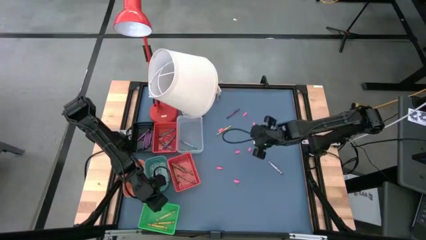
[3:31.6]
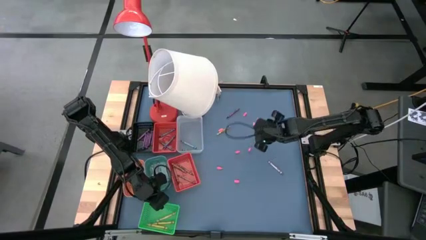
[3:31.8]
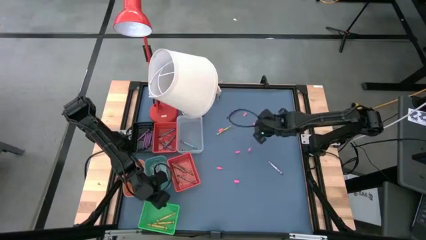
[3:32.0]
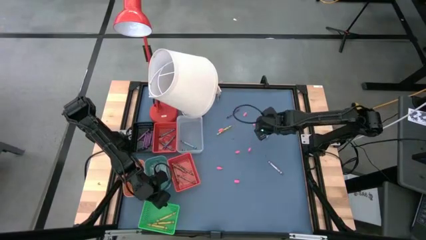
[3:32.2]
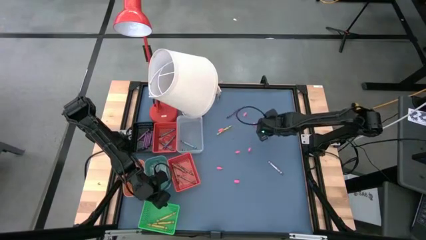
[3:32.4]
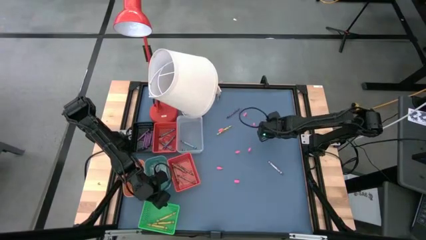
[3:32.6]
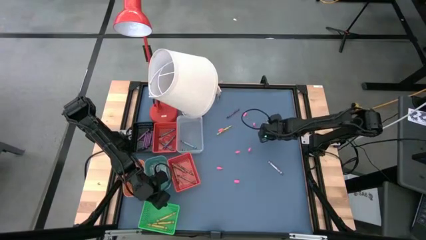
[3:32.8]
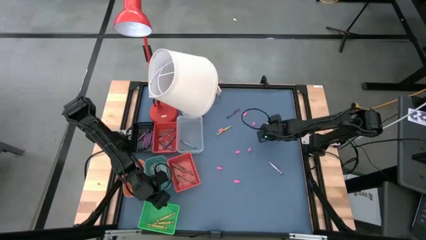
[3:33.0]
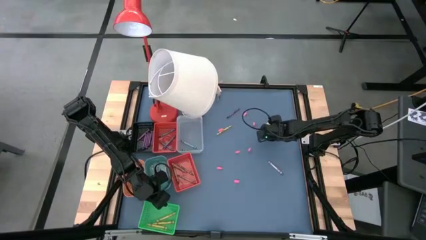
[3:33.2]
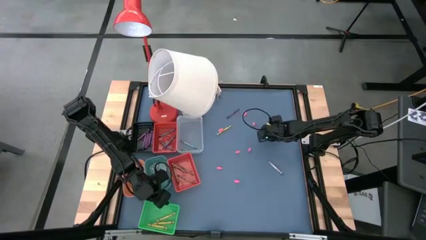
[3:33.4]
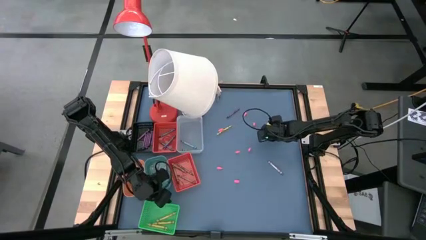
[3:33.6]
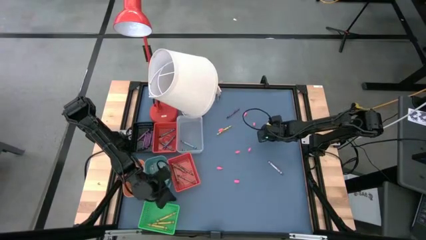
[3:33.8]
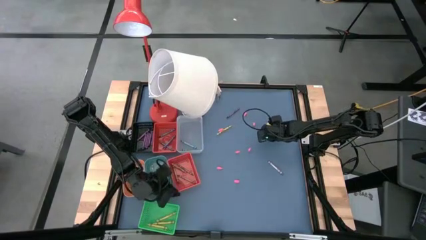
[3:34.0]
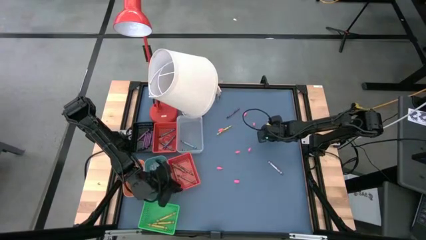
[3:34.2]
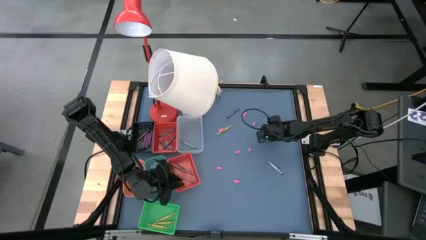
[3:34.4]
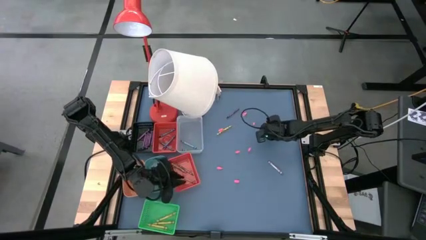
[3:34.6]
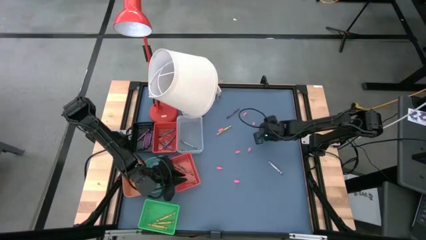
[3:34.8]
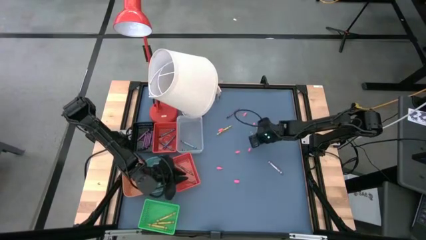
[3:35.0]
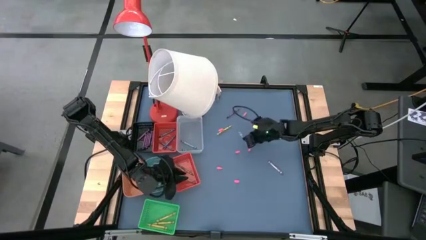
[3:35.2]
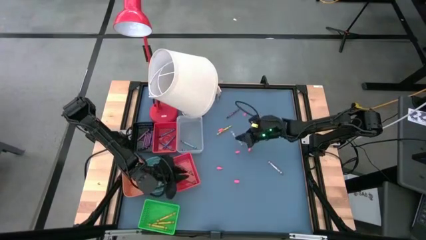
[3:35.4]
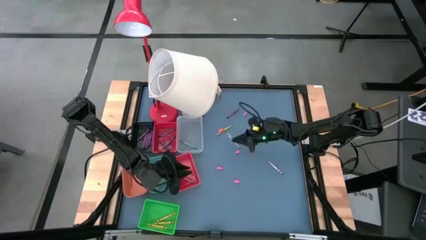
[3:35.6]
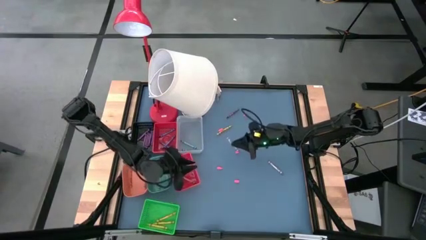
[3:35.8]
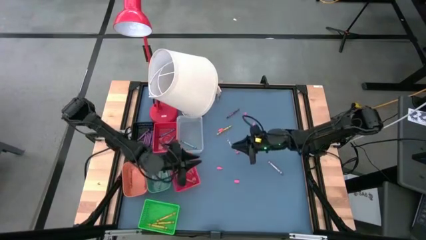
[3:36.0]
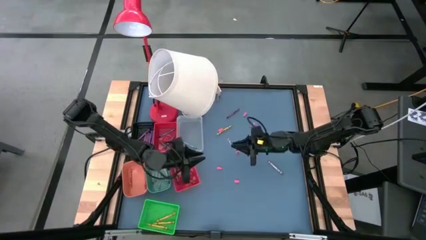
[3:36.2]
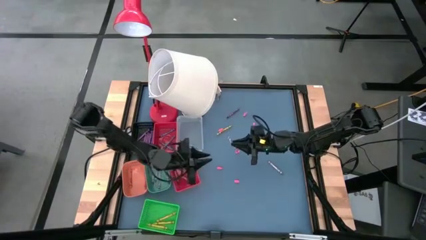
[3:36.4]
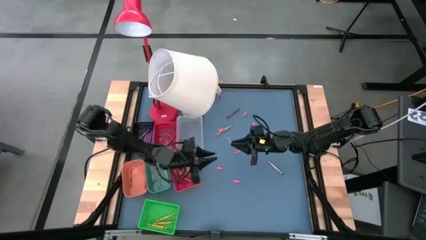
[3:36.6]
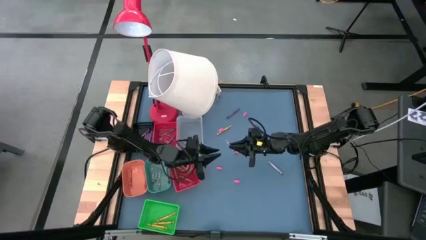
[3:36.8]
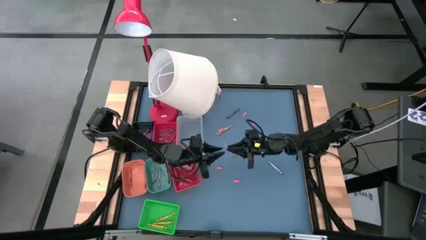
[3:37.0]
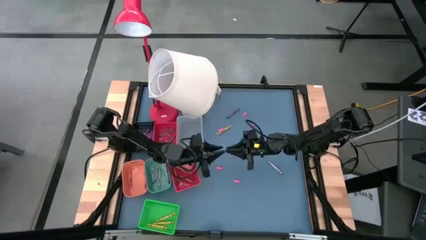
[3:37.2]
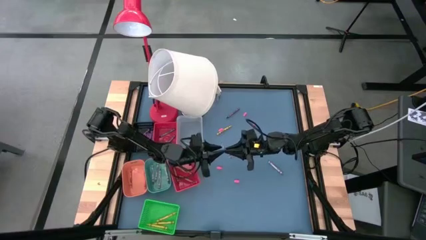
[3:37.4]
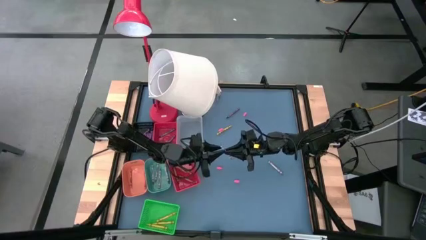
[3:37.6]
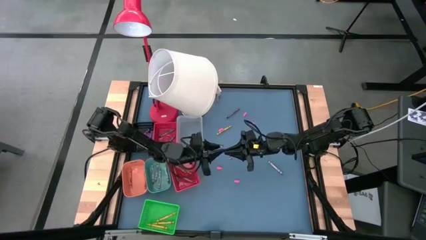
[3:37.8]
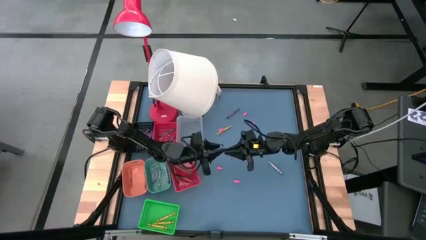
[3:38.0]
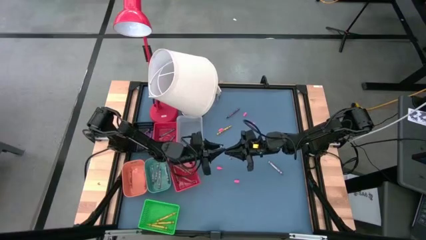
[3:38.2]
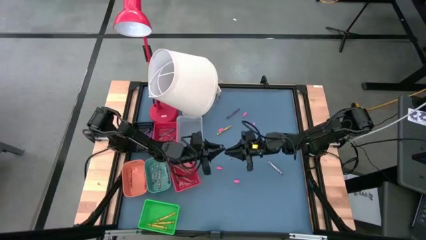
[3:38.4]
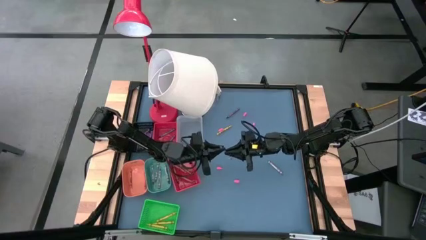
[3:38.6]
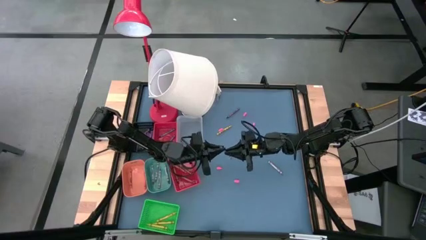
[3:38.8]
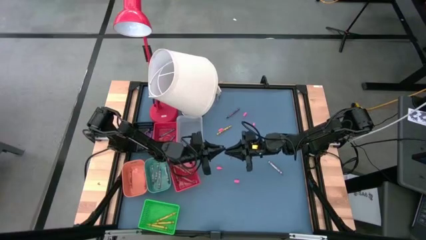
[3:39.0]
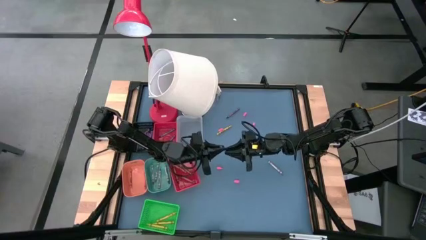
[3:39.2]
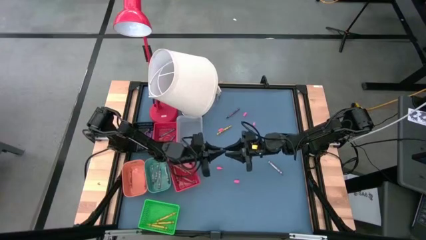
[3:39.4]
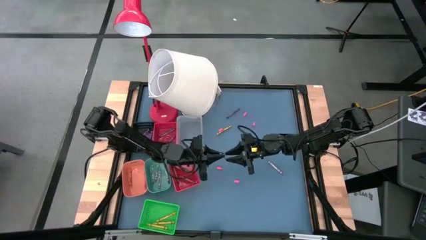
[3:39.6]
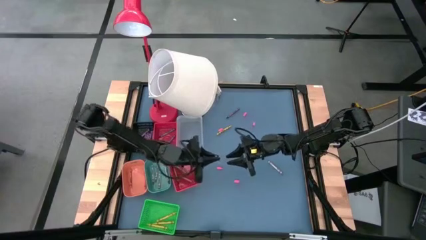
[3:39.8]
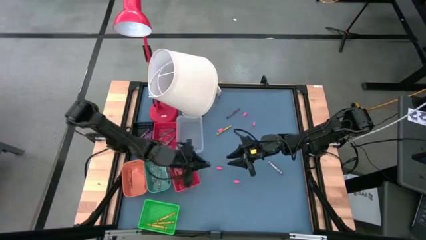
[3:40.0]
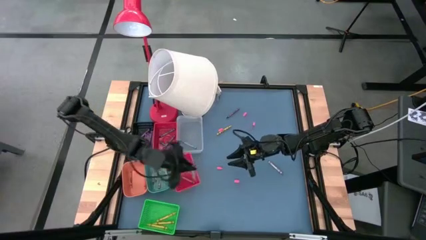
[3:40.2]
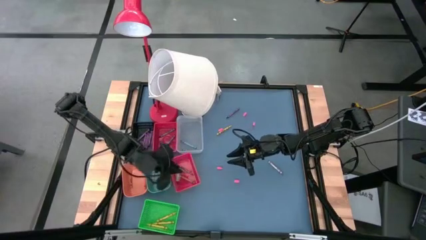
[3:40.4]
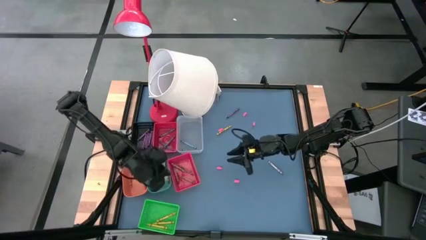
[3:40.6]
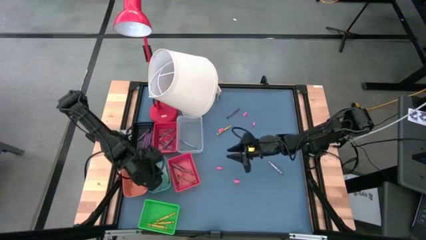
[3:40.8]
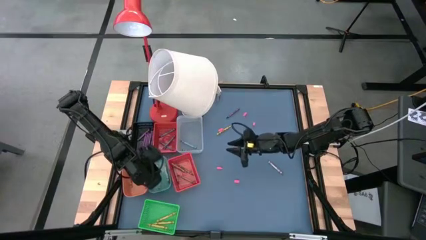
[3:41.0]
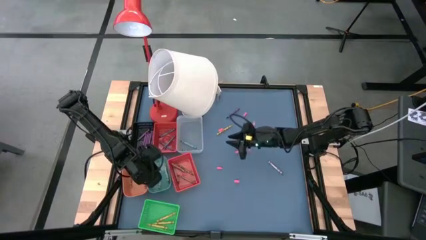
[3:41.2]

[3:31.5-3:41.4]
Task: Sort crayons
Put the gray crayon into the green bin

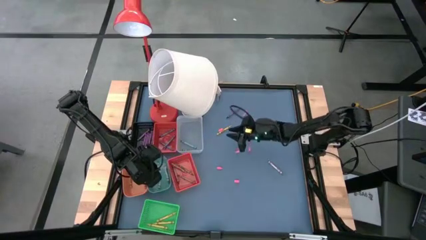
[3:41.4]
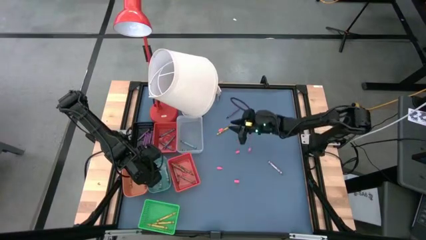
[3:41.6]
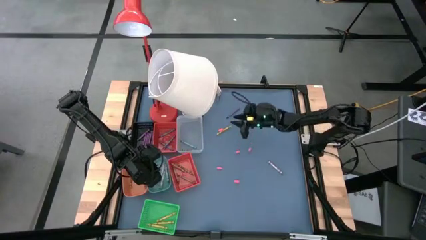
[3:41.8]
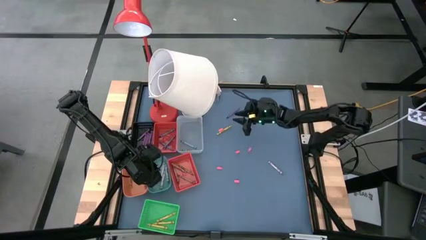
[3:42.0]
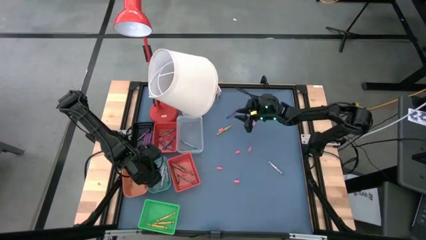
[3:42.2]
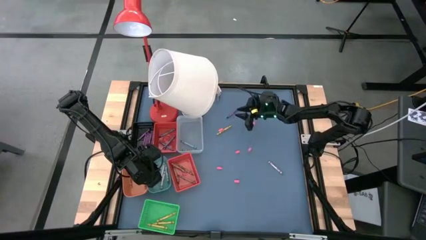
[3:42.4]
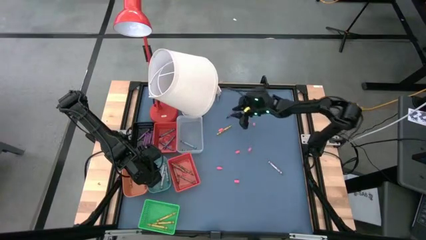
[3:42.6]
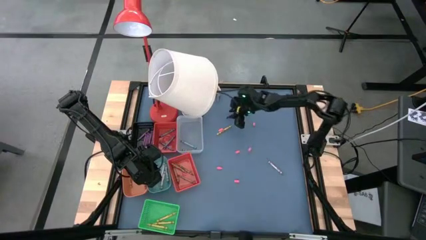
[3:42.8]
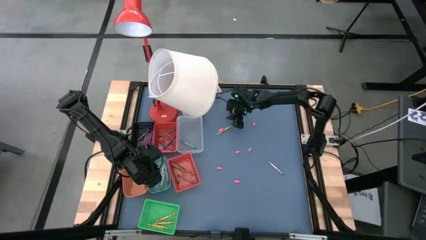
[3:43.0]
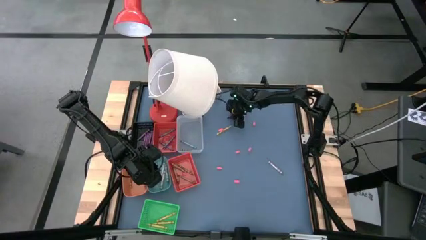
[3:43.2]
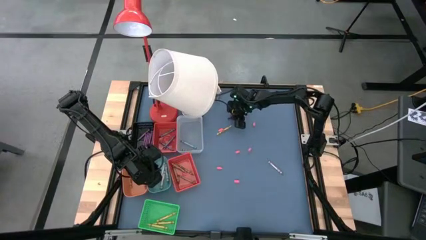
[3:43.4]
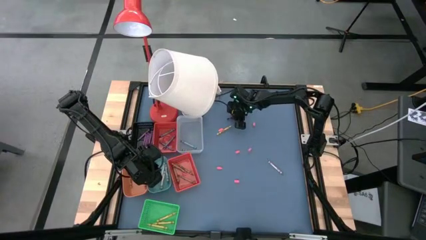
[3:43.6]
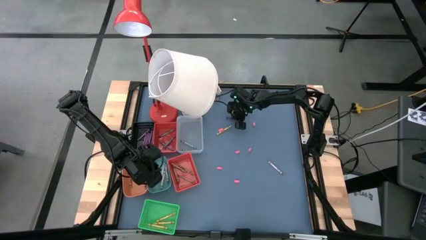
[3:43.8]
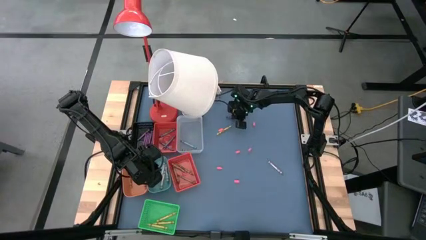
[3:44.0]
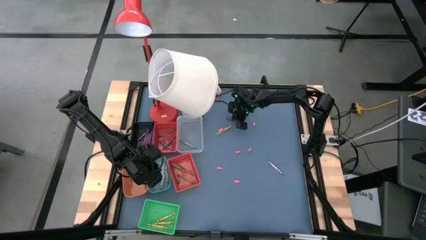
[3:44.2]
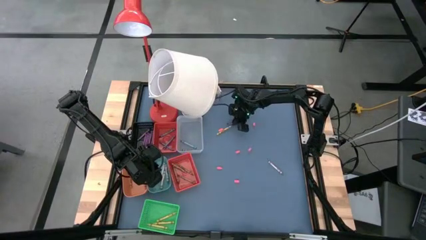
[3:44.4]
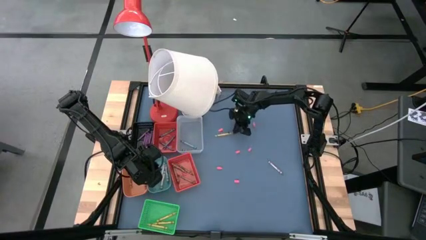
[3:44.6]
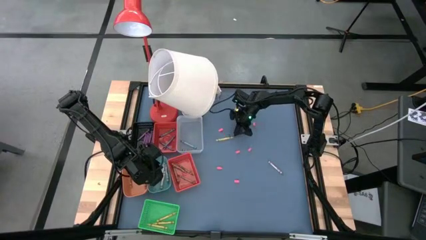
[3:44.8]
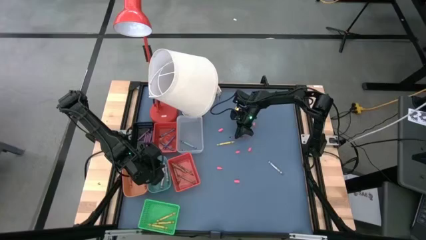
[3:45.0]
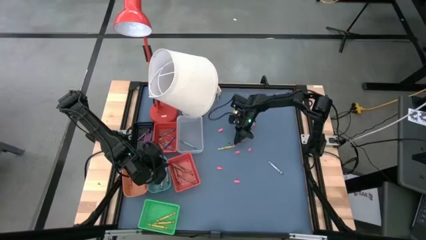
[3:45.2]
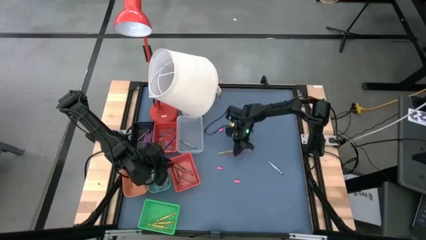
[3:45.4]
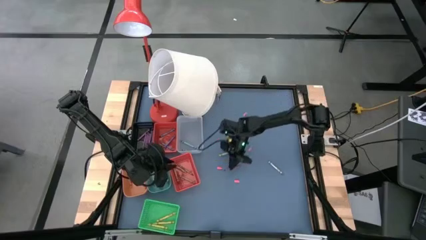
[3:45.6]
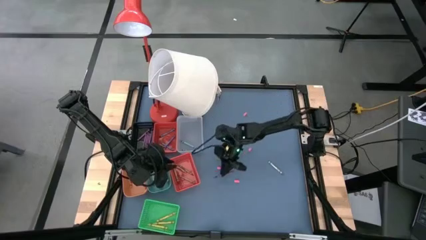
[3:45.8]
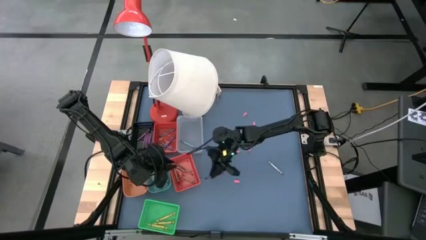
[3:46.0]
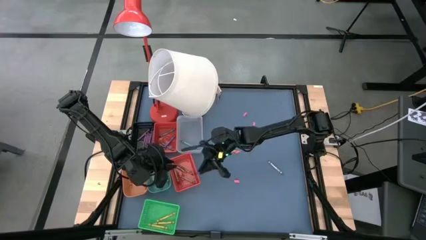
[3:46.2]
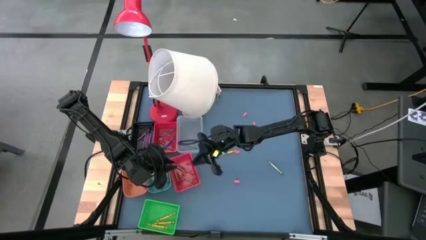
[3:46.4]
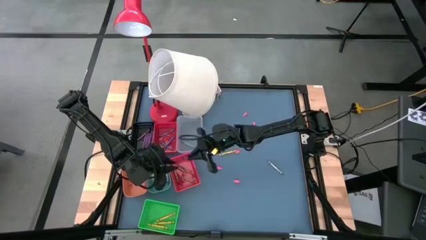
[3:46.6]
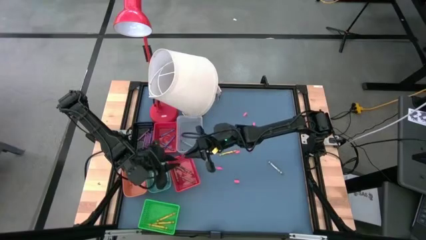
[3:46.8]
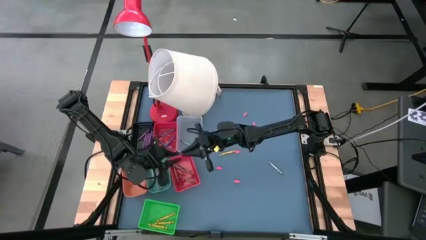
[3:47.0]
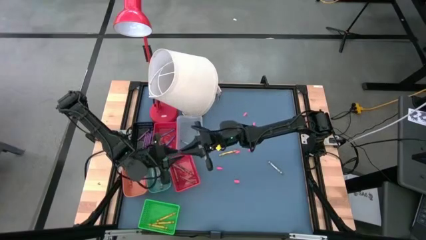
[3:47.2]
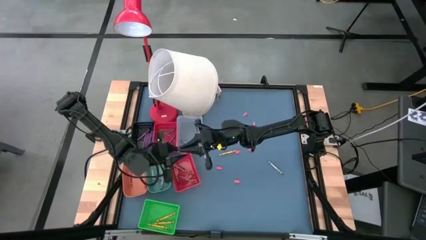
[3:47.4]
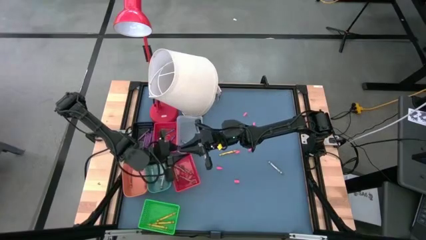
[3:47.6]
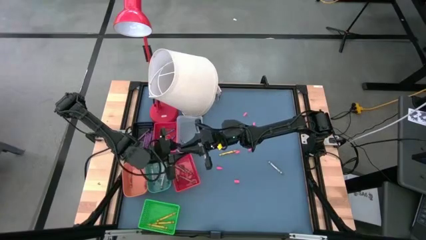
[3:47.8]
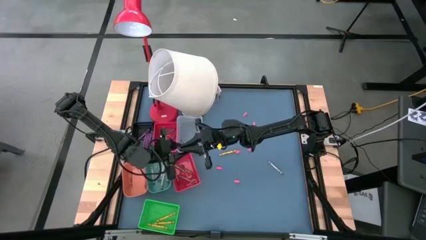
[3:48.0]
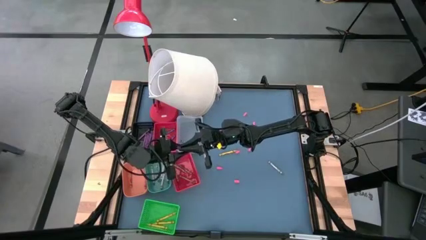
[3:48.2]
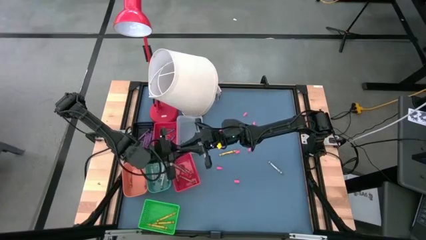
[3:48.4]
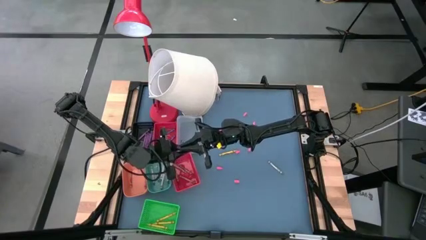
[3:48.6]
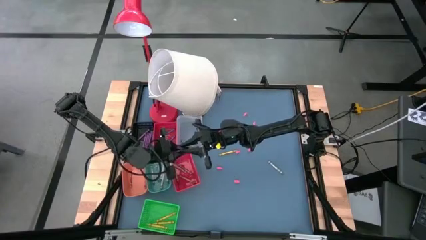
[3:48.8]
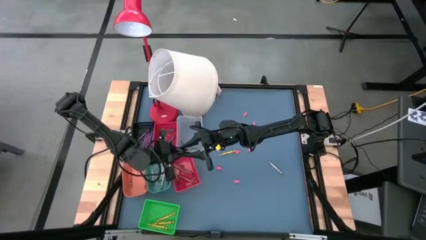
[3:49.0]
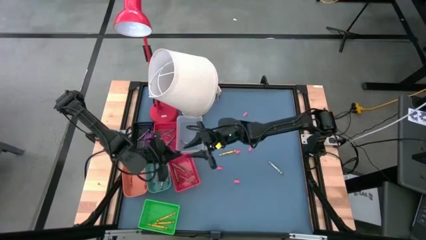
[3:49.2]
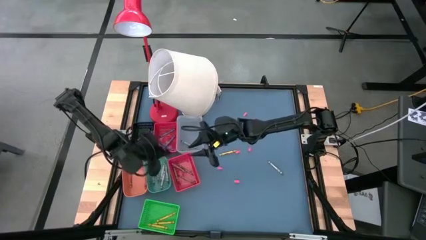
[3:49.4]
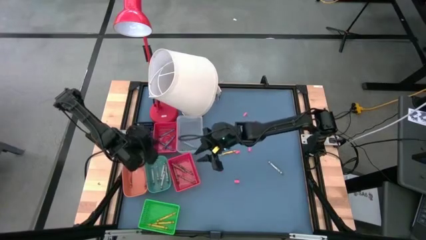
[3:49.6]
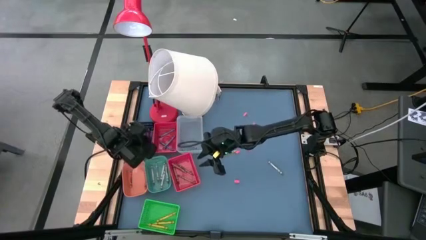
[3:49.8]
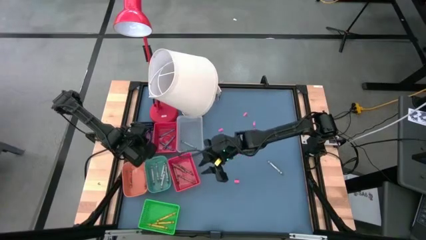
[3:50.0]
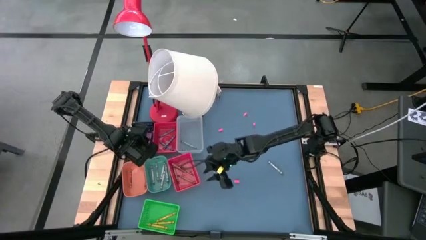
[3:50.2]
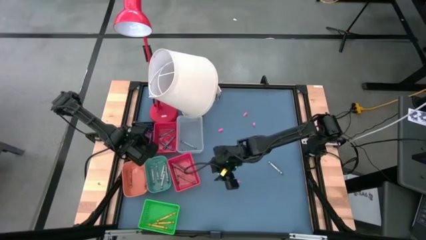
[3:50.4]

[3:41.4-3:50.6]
Put the violet crayon into the black bin
